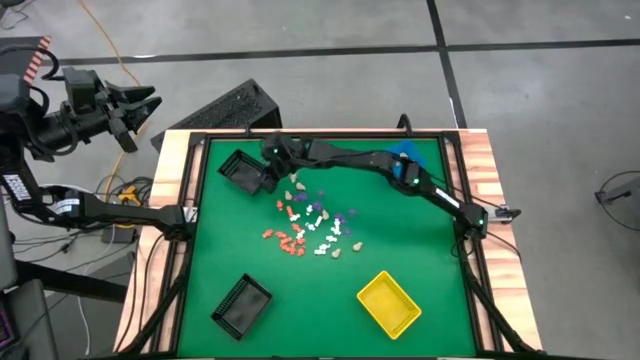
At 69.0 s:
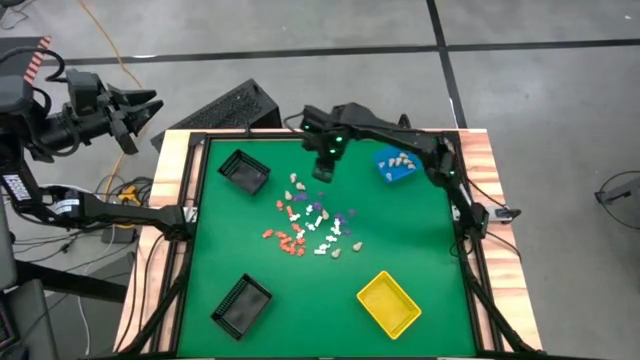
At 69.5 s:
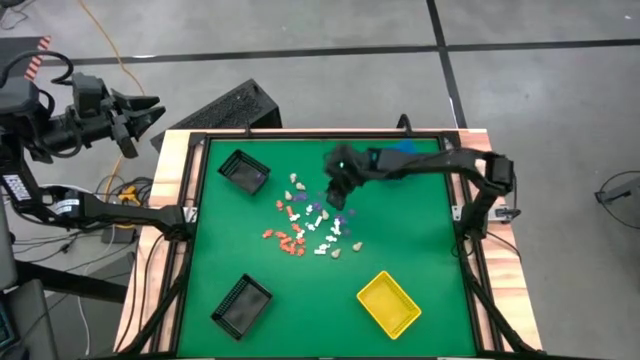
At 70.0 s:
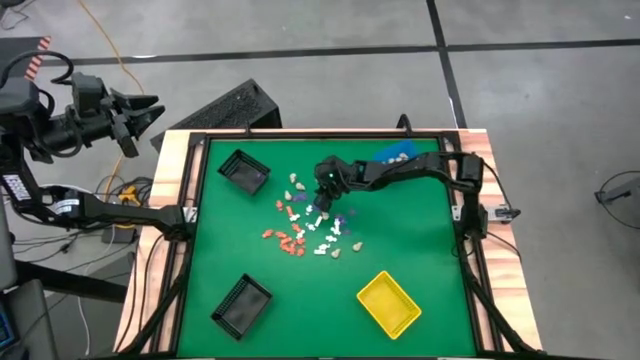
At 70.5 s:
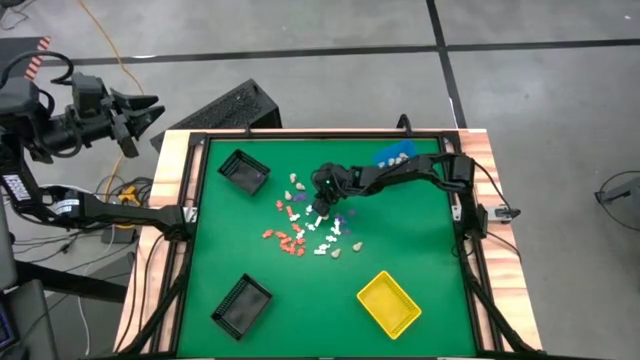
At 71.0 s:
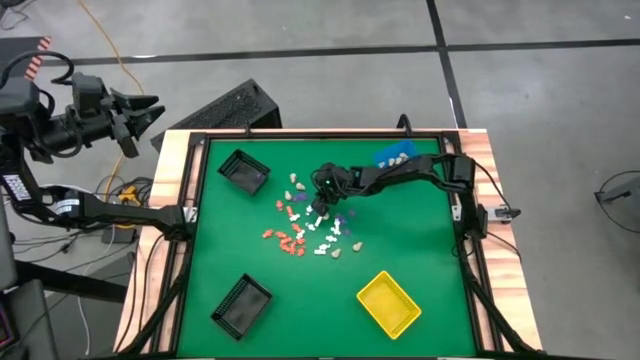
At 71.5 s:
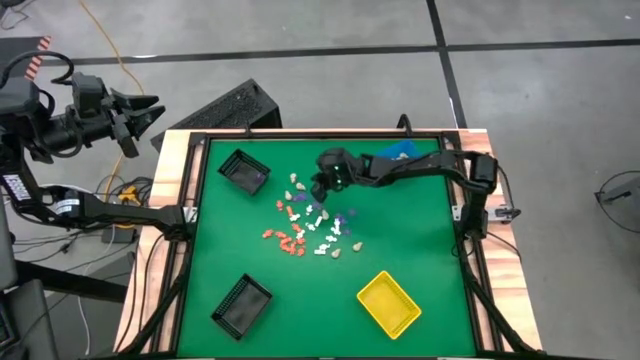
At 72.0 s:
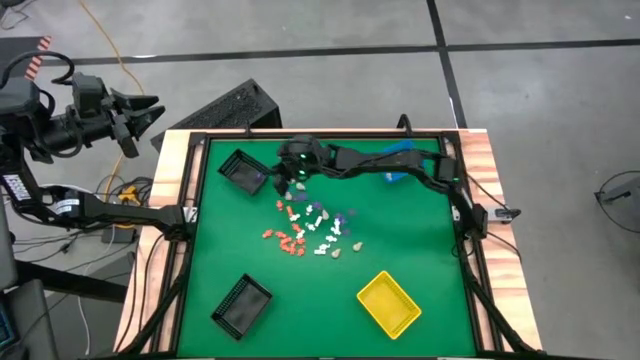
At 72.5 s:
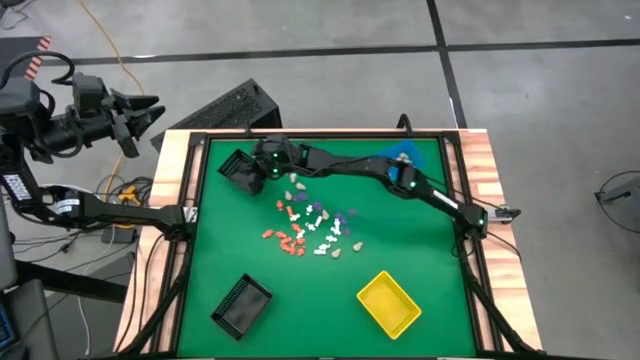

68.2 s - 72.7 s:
Task: Sort Halloween decoration
Put the purple spider toy into the top black basket

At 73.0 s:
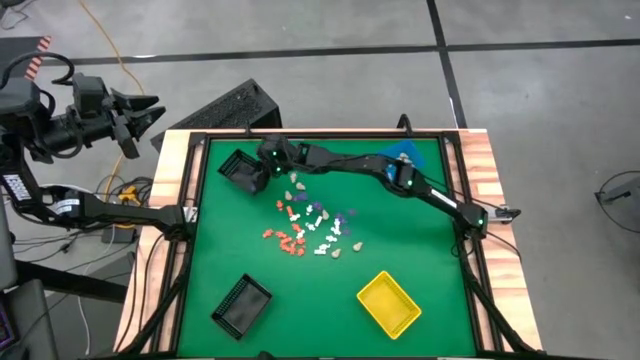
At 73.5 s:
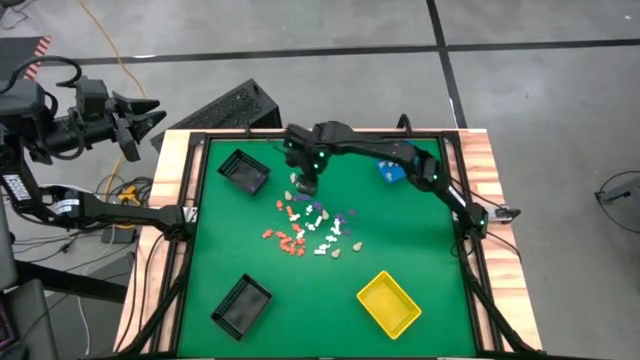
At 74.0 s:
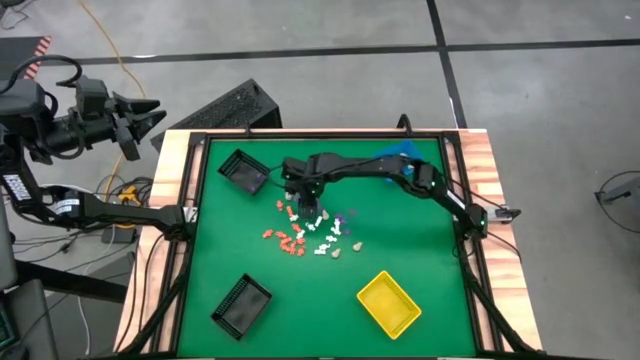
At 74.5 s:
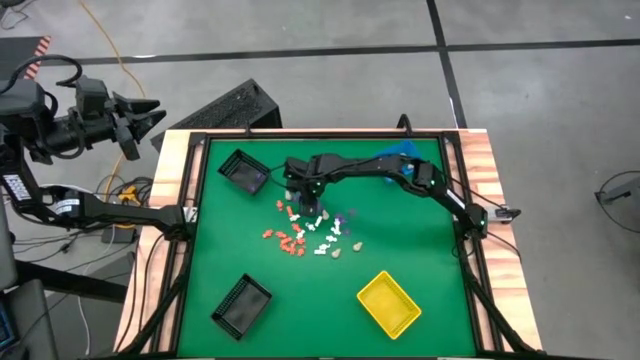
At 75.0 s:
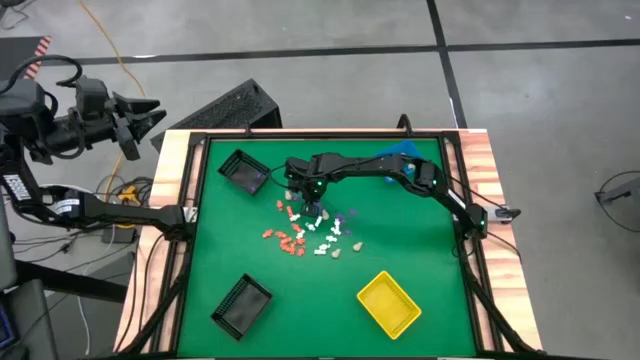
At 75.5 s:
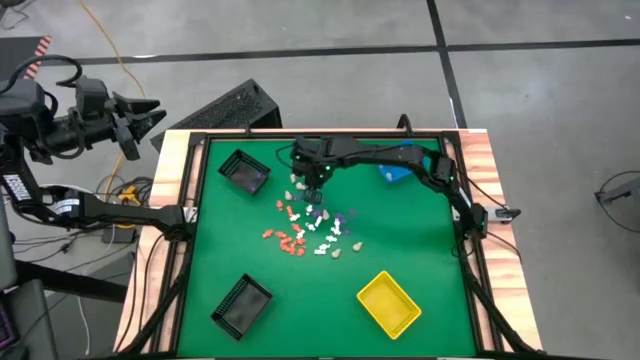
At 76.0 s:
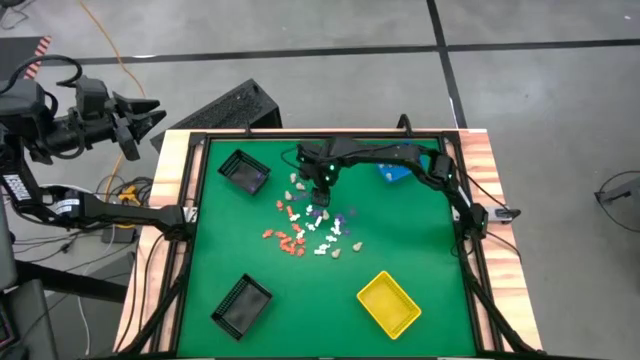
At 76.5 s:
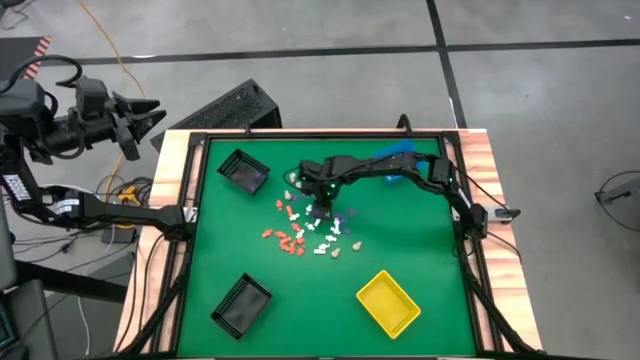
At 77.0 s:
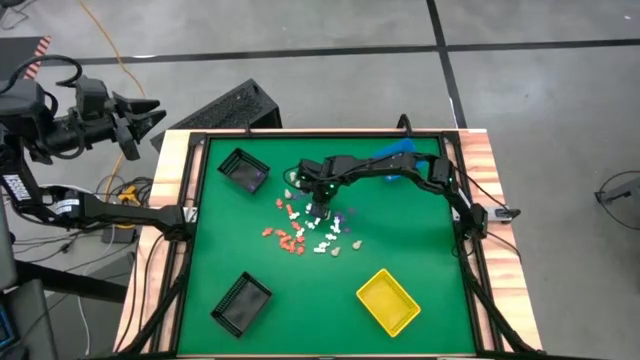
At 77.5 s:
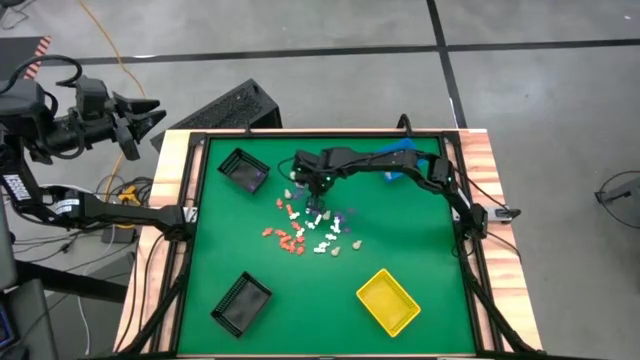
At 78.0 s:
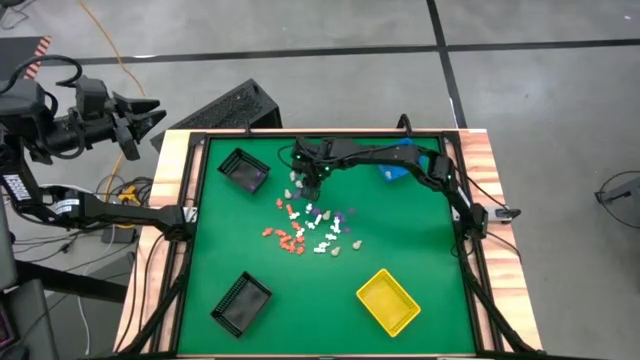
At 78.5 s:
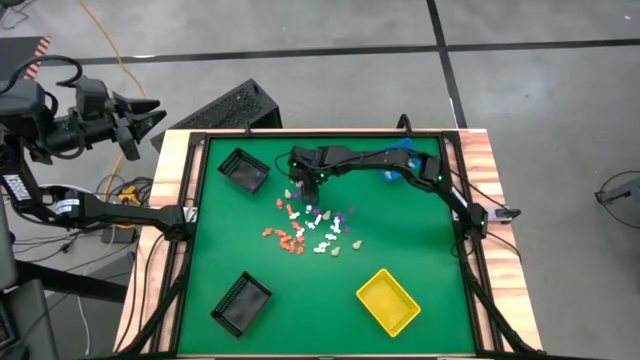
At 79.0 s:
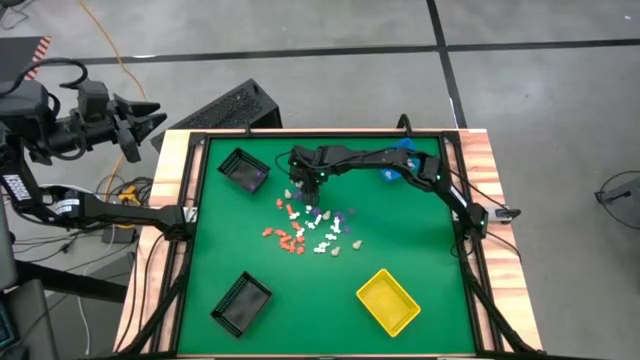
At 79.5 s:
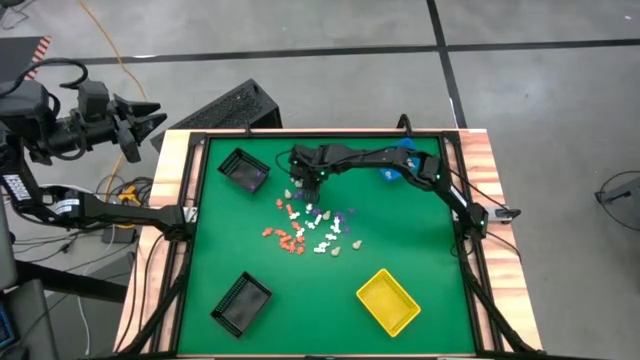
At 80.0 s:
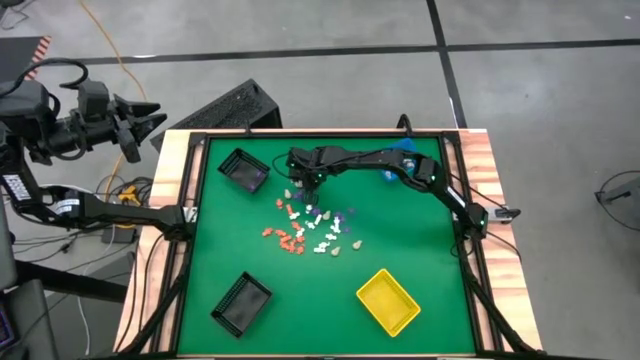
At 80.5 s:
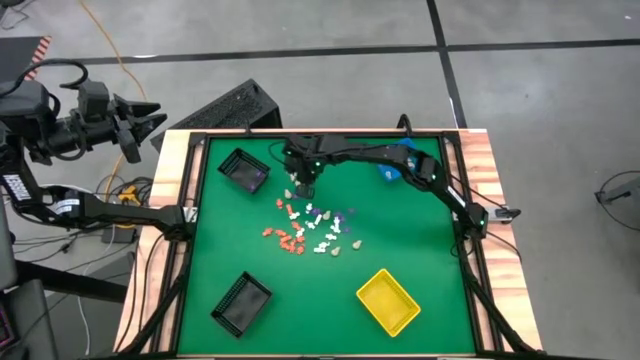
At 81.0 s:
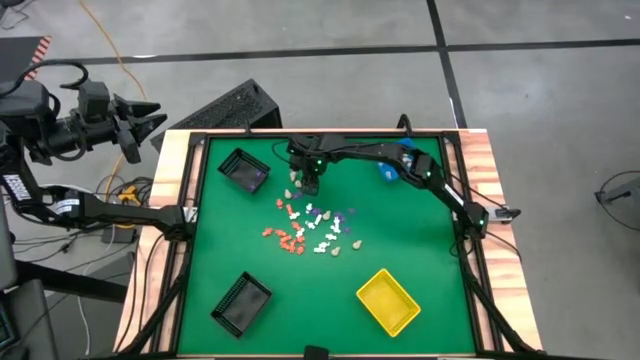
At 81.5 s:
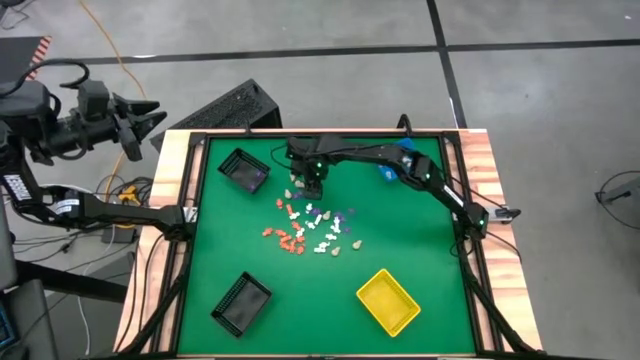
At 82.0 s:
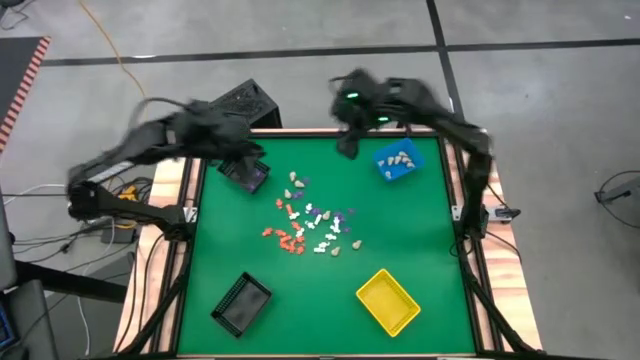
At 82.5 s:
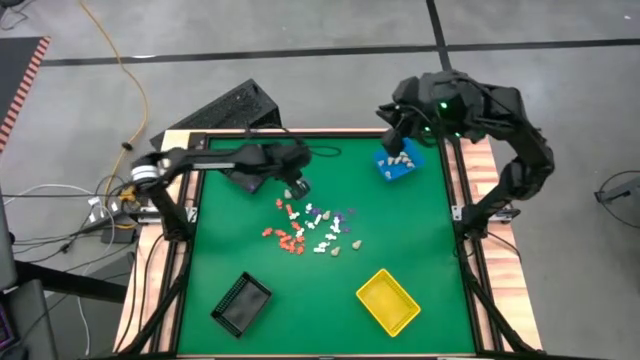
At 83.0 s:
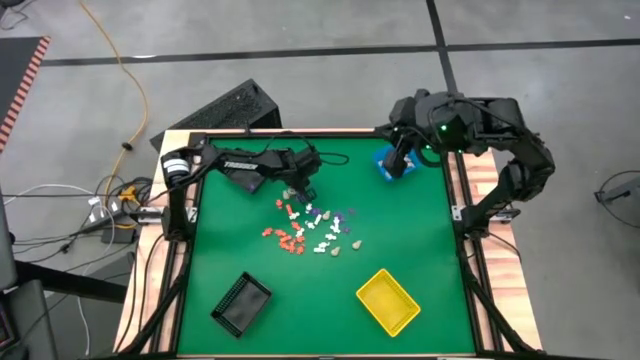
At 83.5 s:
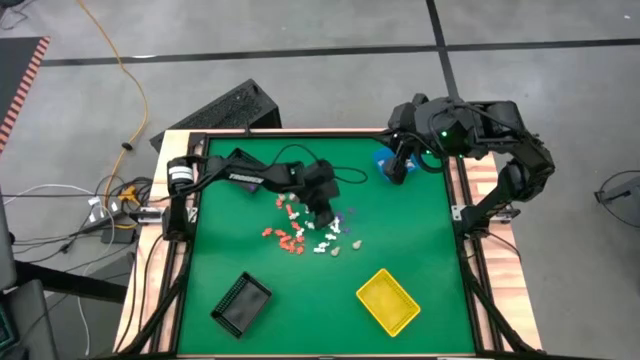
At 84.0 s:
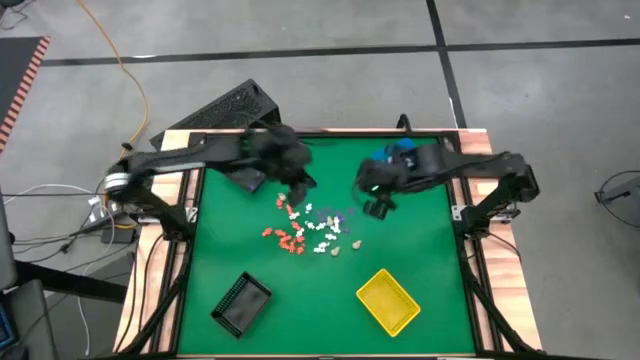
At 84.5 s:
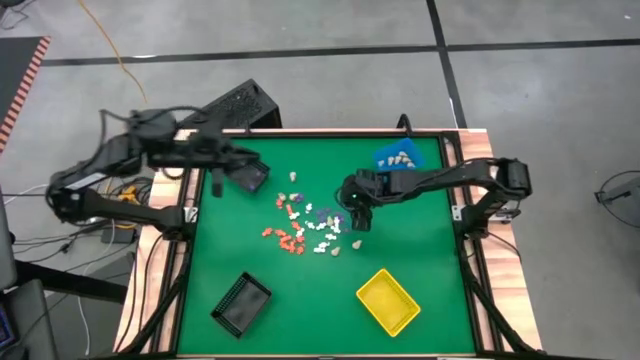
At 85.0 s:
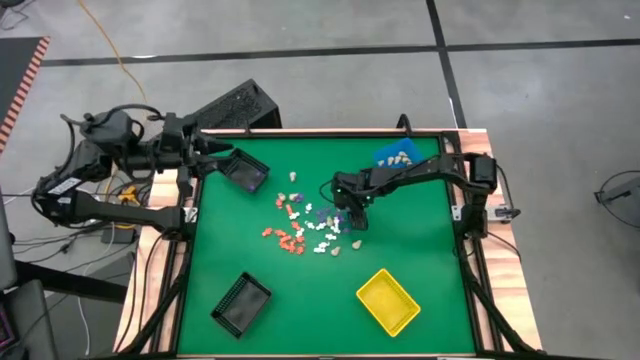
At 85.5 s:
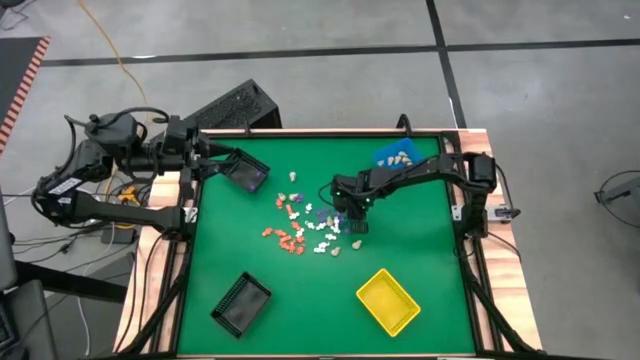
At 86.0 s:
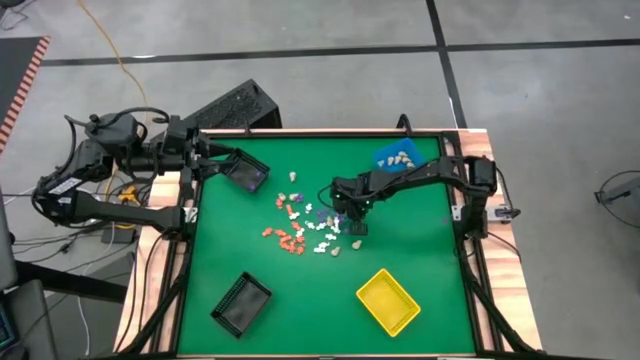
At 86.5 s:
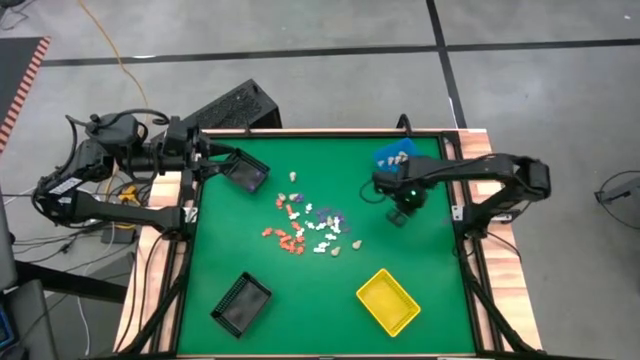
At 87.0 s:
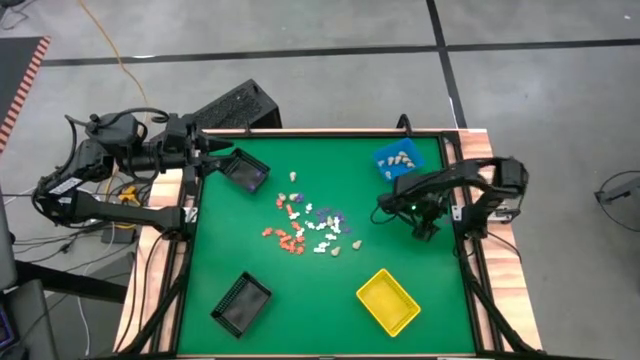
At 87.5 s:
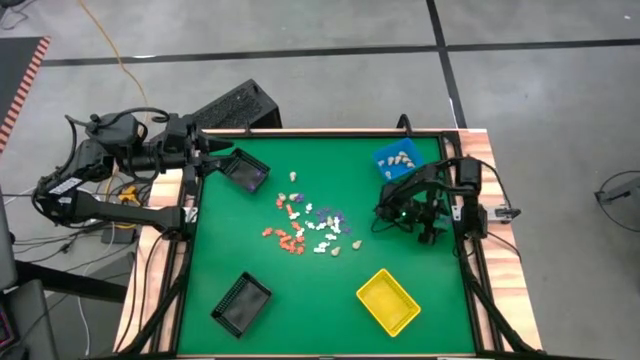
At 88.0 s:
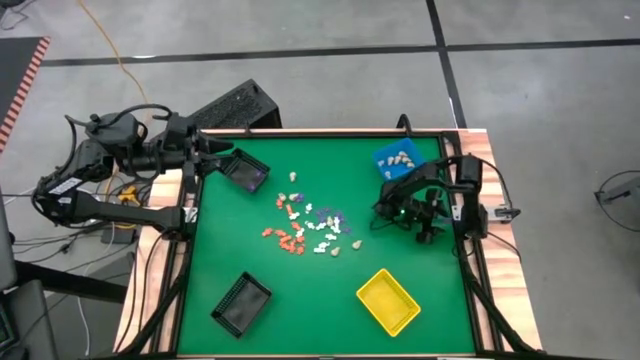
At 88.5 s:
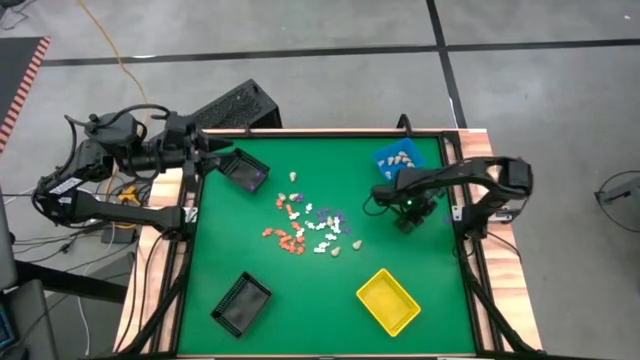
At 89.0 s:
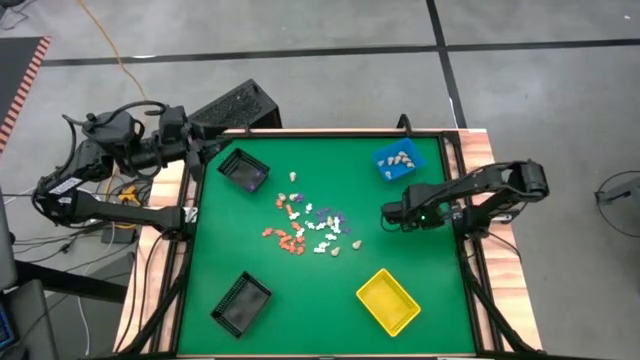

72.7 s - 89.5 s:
Put the purple spider toy into the top black basket

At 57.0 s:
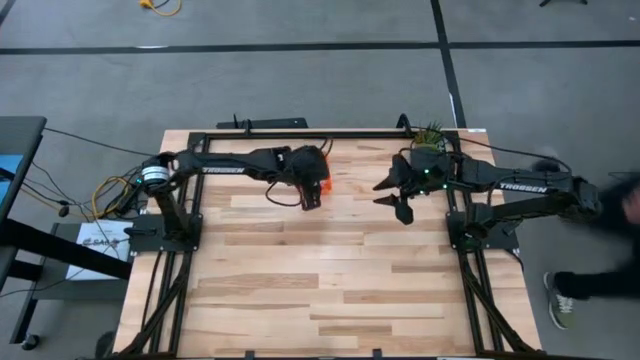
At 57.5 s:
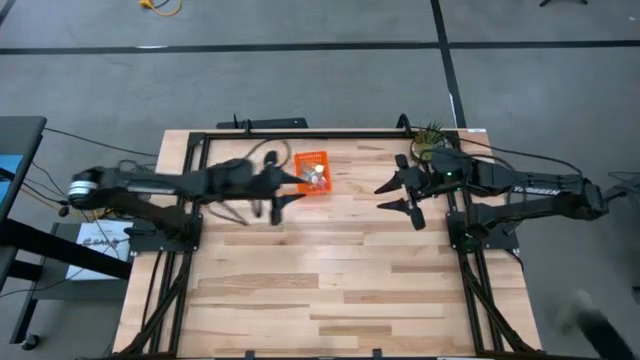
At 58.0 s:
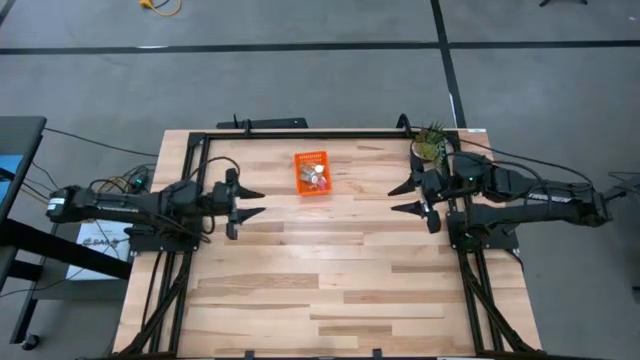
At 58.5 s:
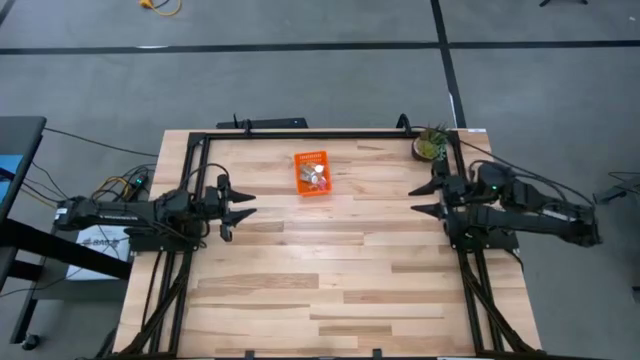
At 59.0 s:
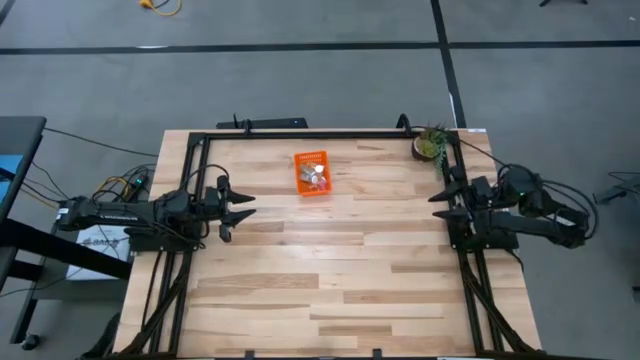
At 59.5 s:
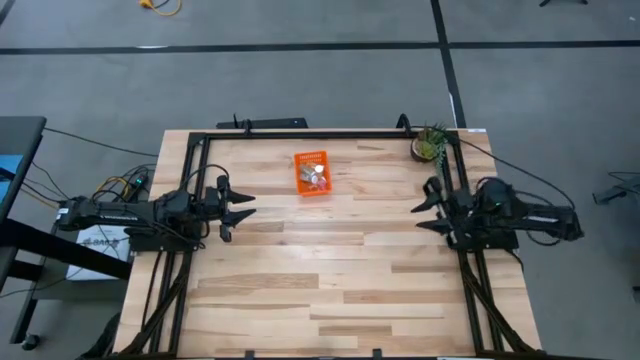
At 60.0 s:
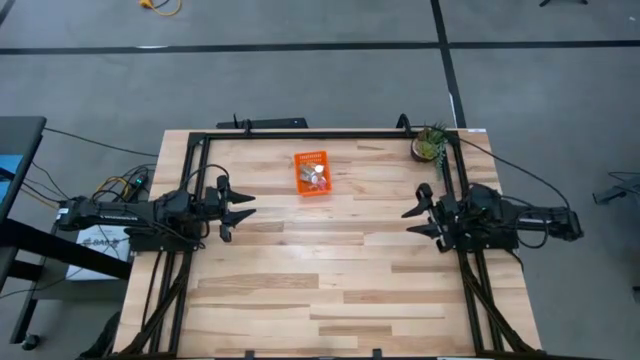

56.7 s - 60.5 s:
Task: Pick and place pill bottles into a basket
Return to Home Position
